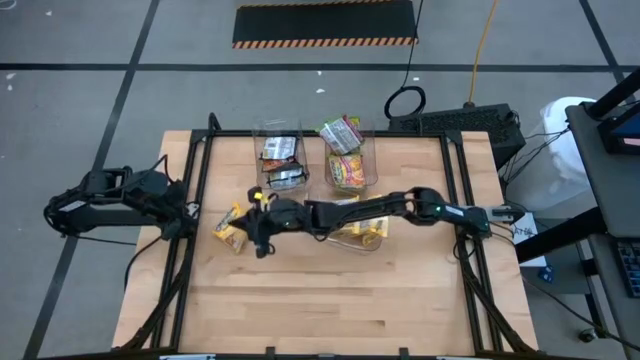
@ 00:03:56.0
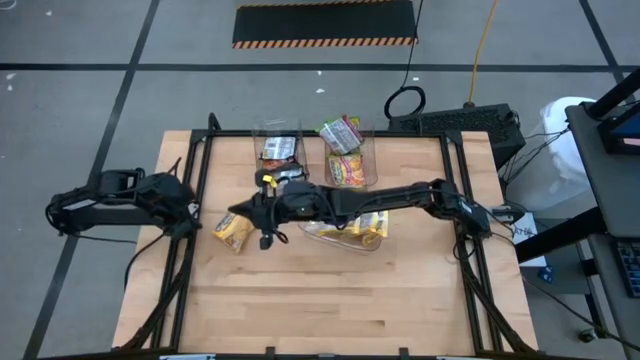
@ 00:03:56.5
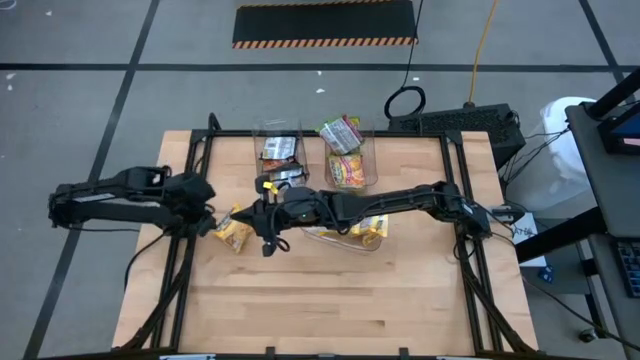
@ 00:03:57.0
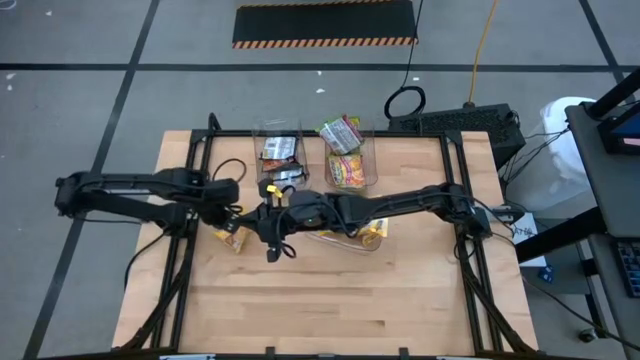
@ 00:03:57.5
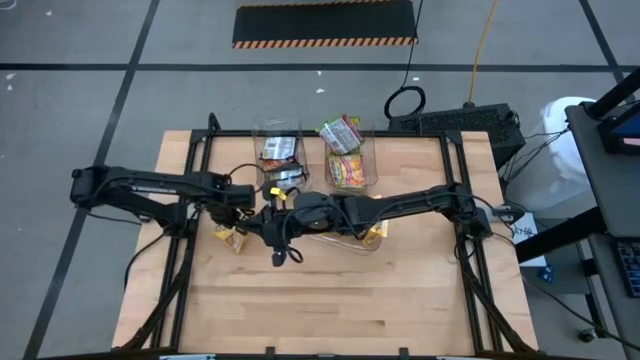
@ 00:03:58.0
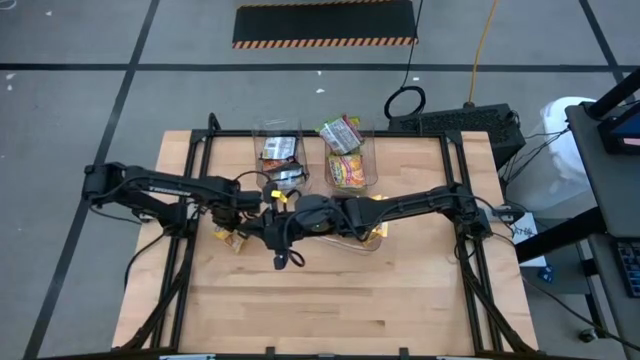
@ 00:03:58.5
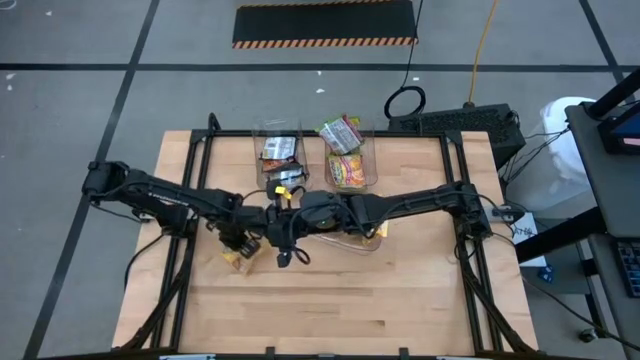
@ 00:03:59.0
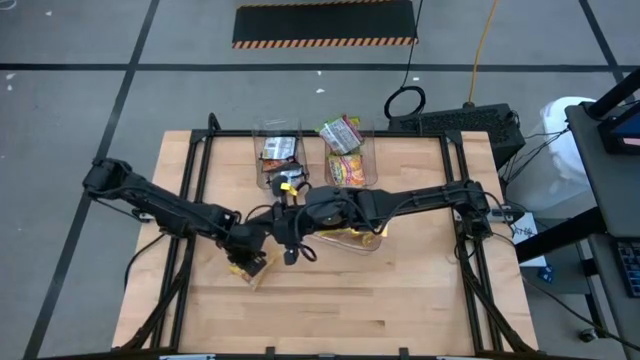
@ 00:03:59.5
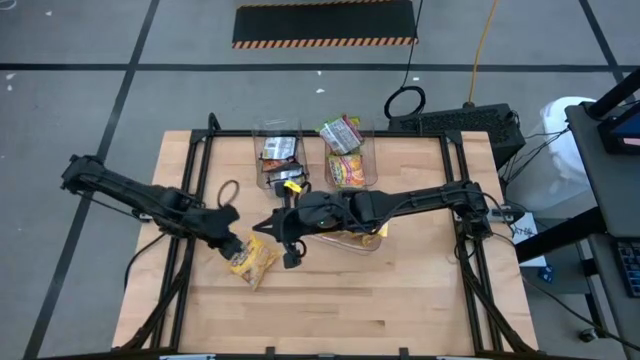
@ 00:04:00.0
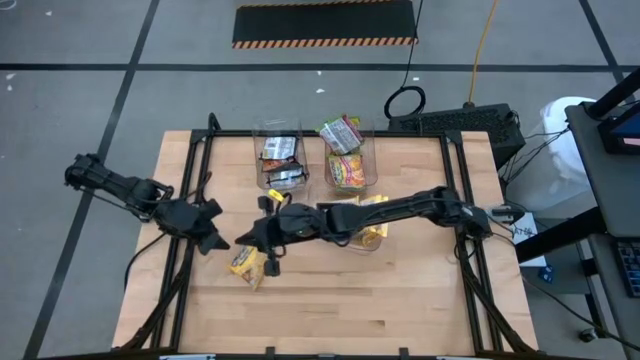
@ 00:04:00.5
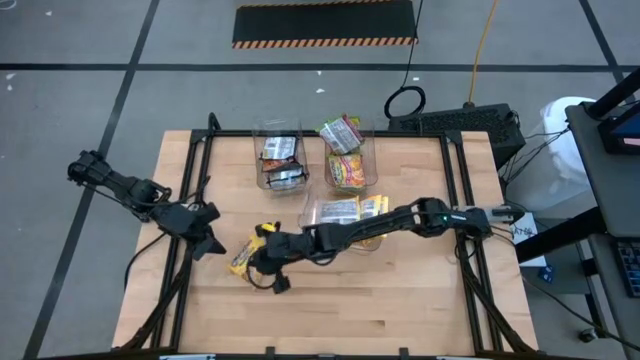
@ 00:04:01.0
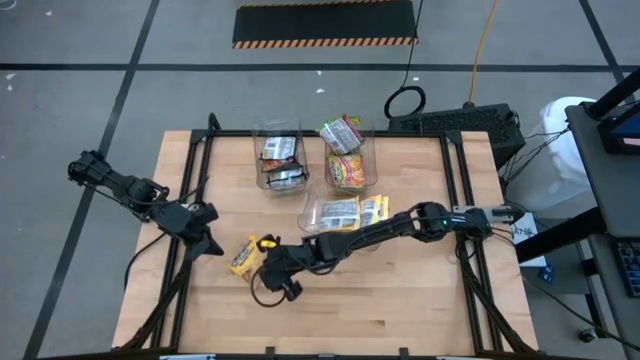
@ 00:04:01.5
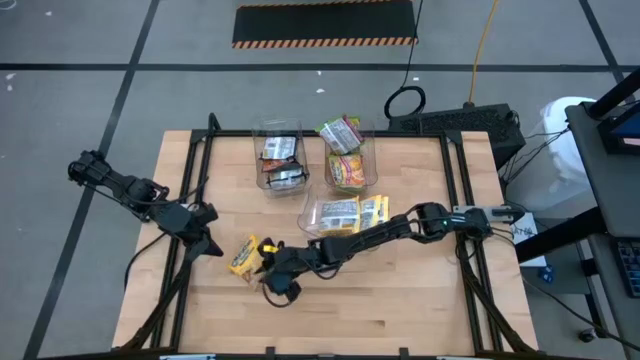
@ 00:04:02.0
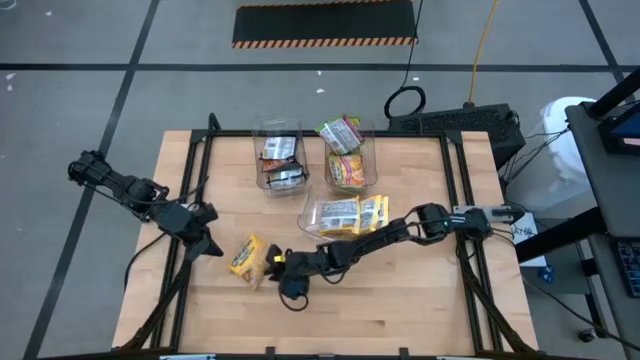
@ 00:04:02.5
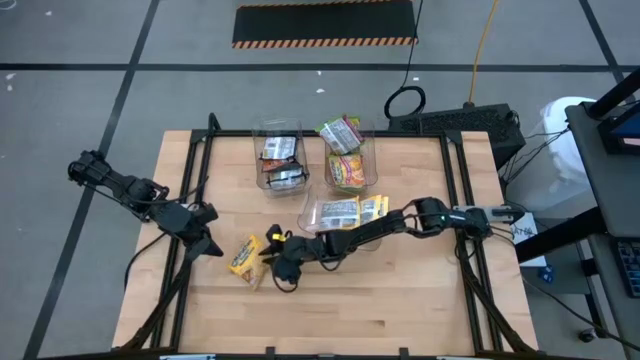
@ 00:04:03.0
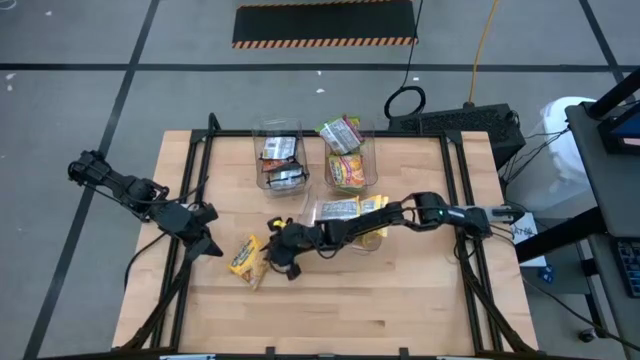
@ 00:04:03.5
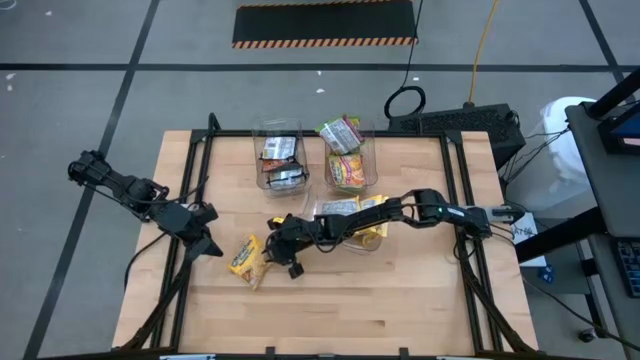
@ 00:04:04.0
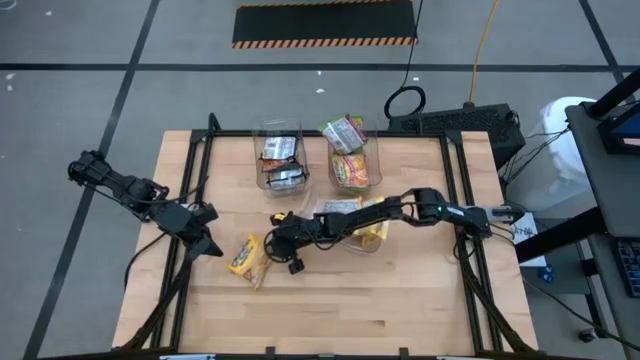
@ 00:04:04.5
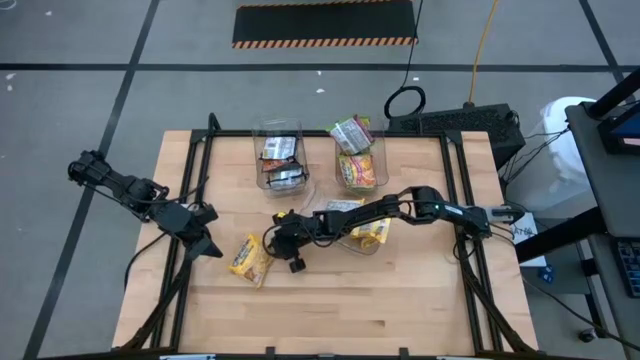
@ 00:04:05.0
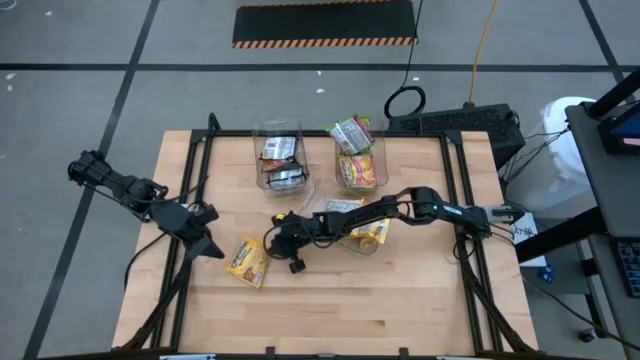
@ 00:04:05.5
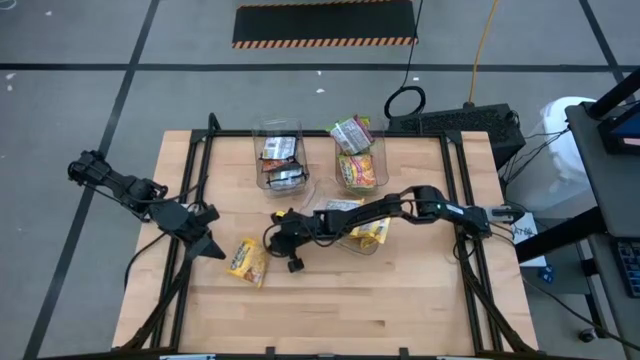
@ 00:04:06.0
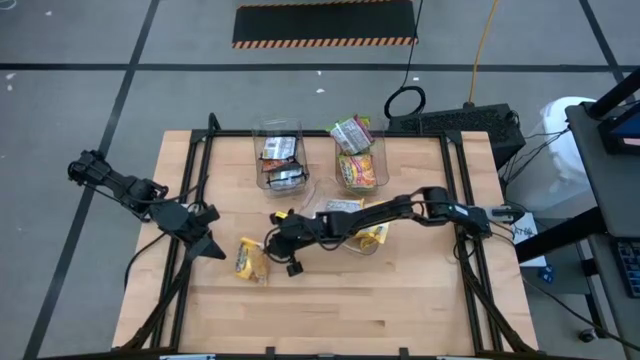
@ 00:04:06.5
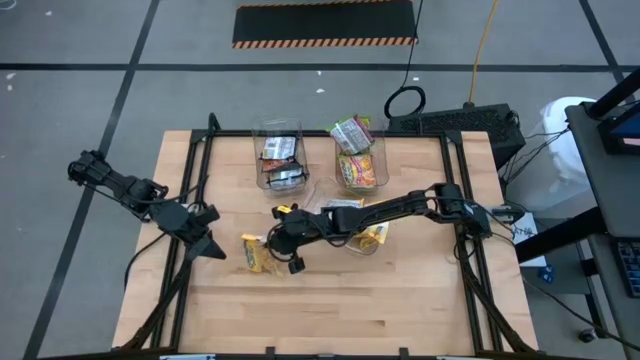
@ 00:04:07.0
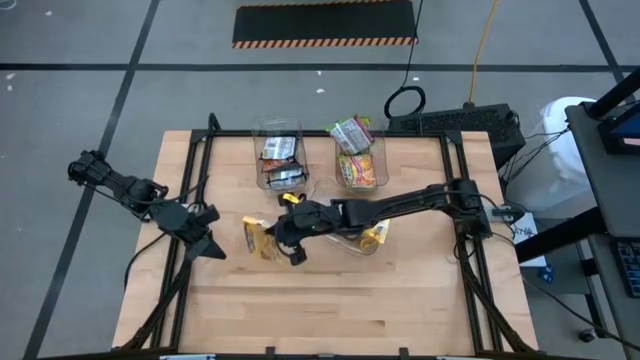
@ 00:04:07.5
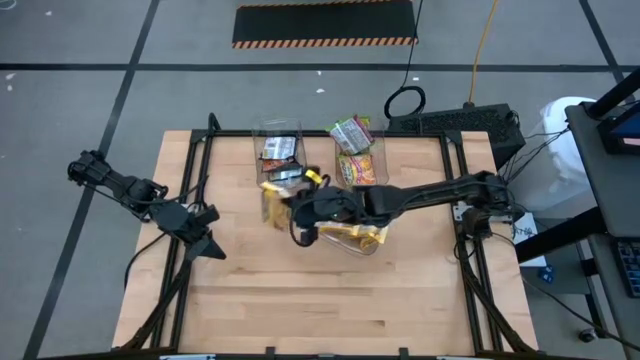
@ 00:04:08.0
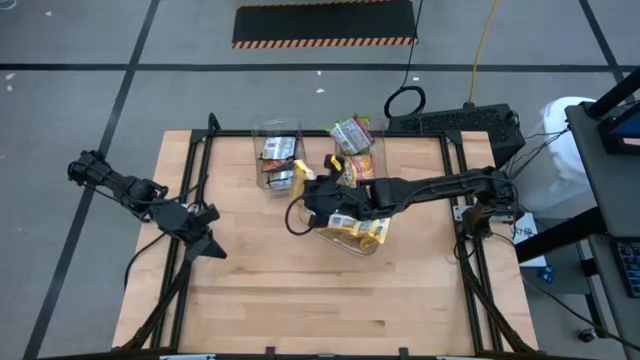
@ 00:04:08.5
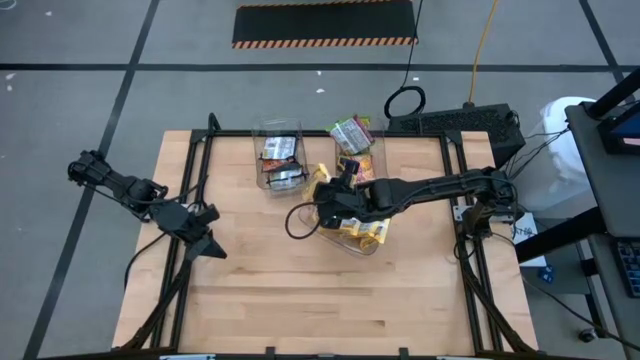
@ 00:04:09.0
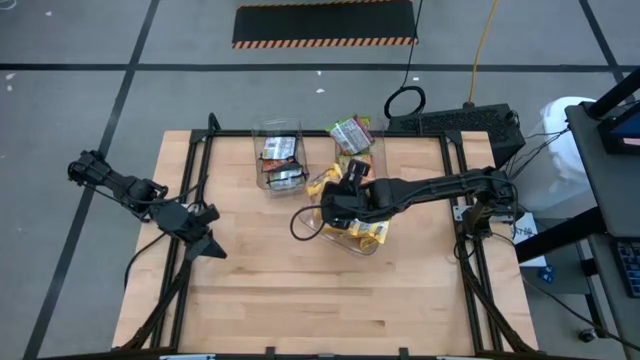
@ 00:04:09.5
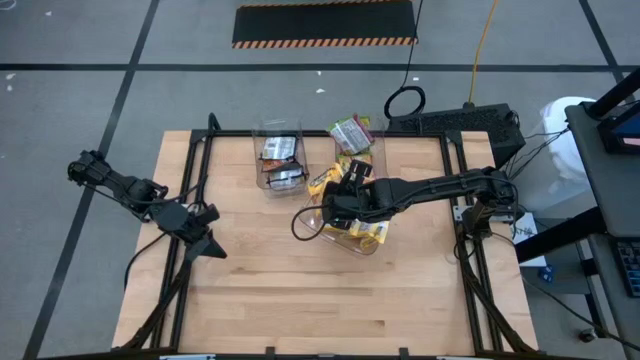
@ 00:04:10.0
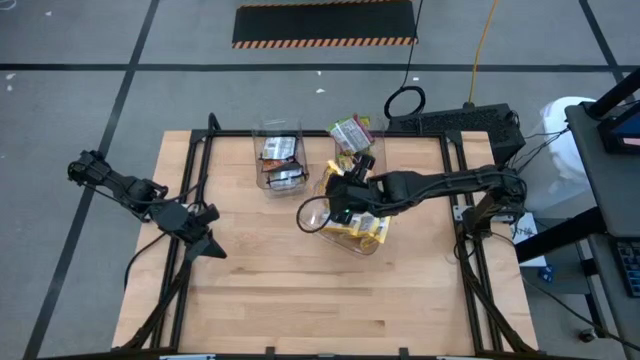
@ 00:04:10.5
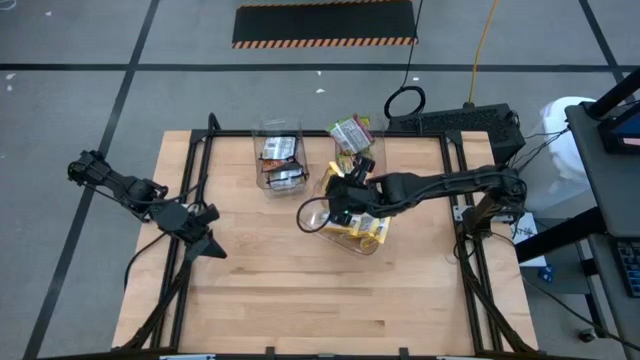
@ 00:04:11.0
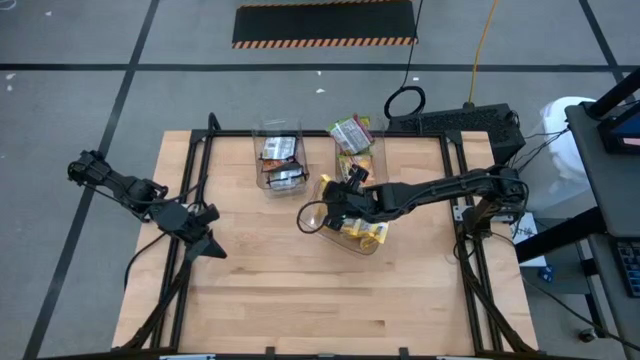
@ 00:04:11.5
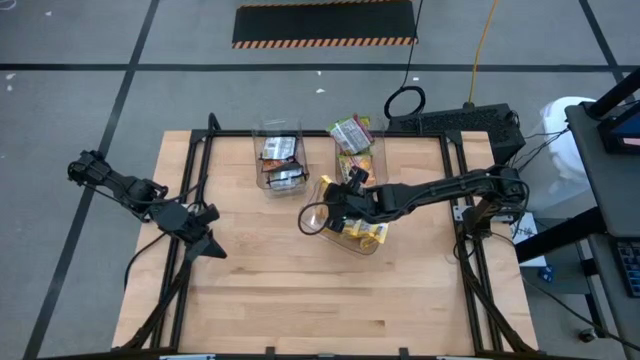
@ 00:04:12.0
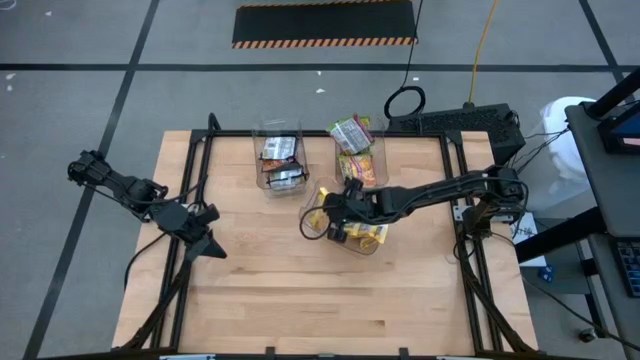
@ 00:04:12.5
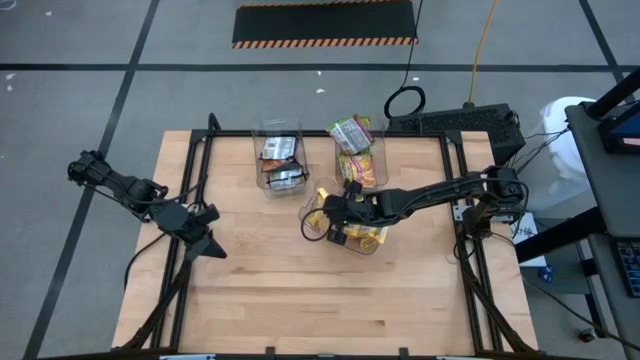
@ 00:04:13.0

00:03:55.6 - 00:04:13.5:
Task: Sort Maruchan noodles
Put the yellow noodle pack into the bottom transparent bin
